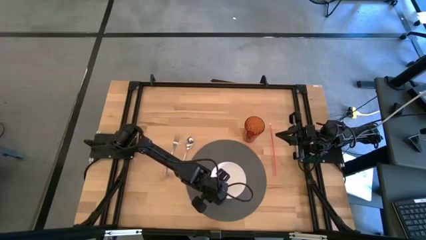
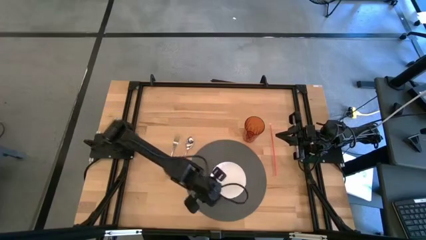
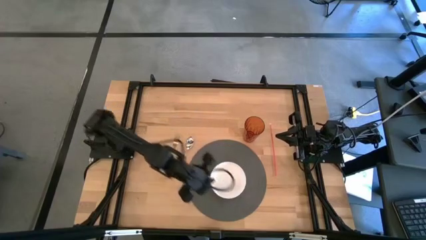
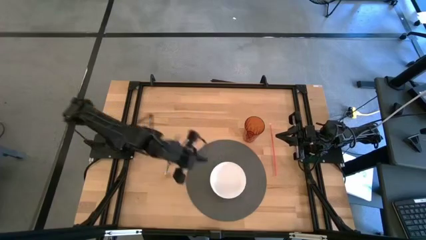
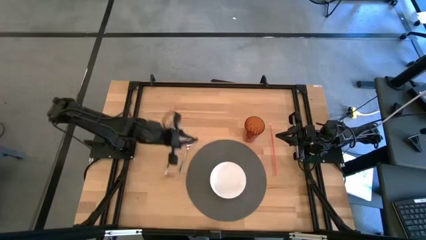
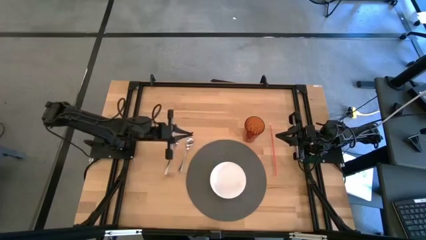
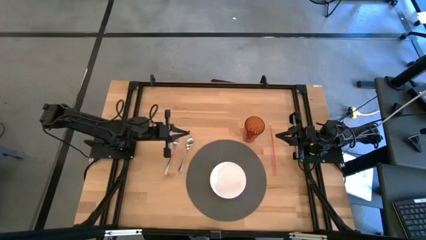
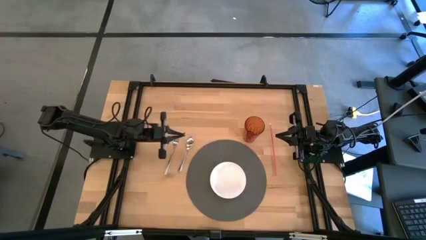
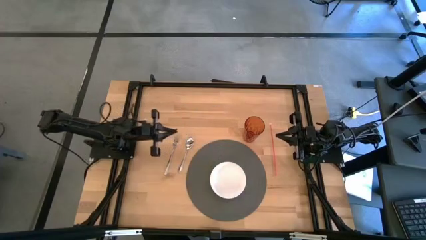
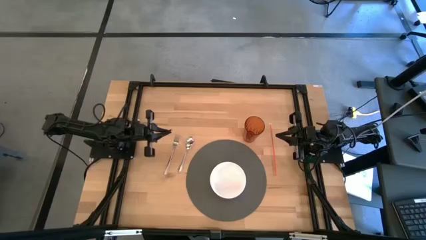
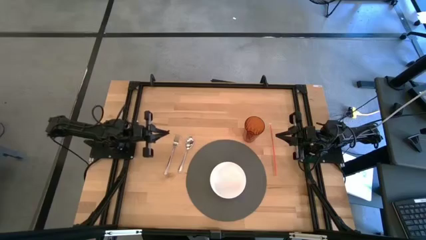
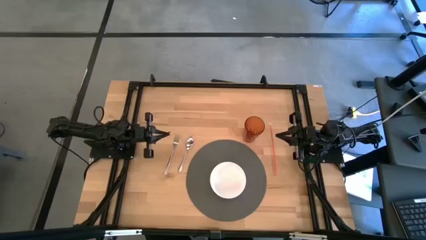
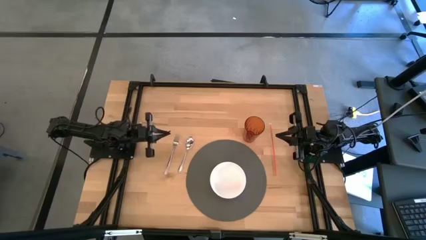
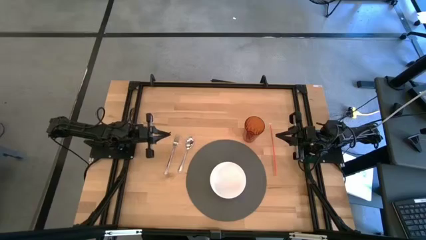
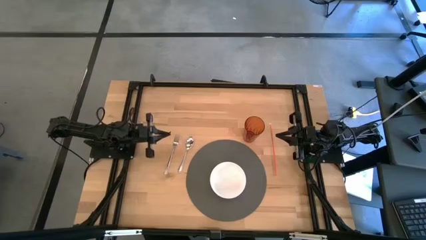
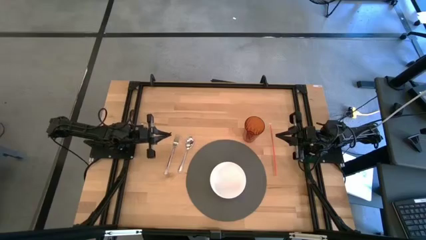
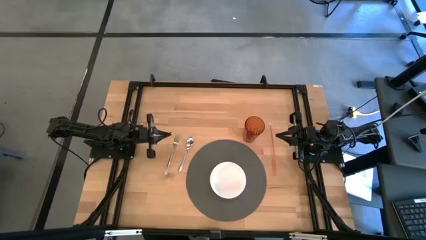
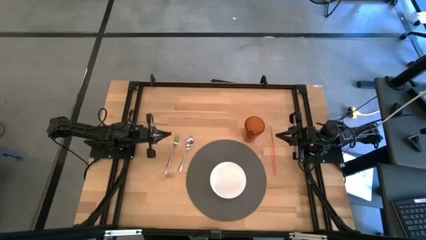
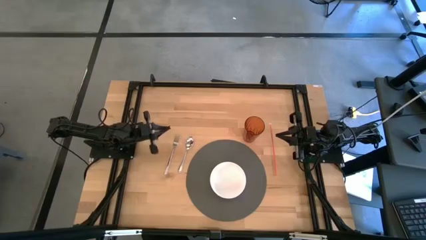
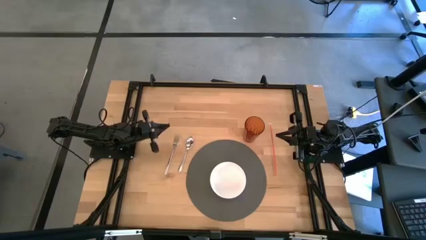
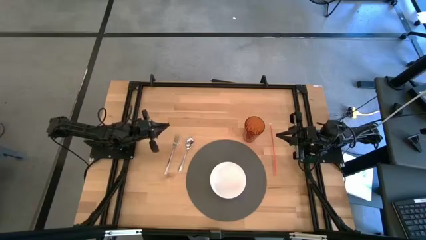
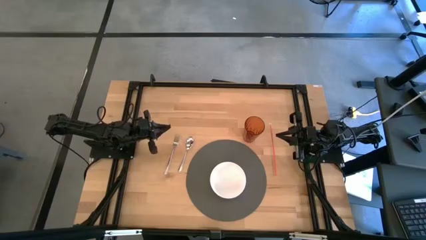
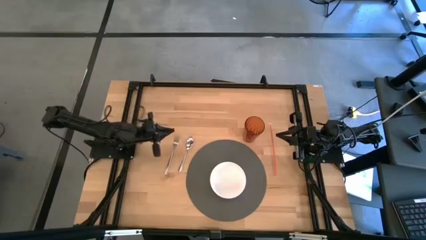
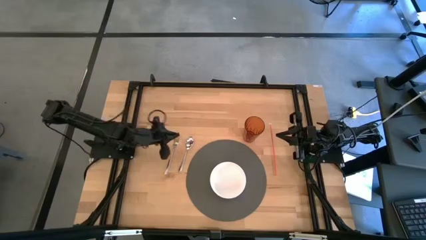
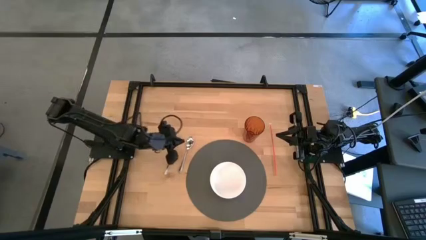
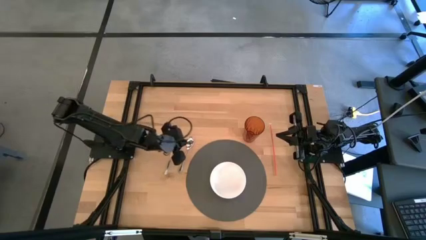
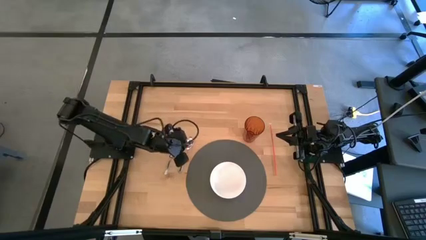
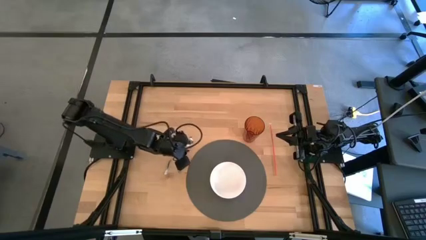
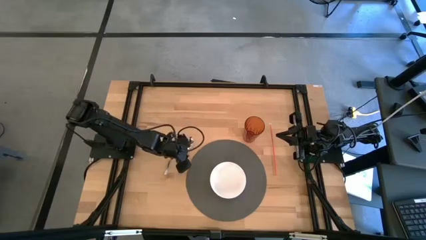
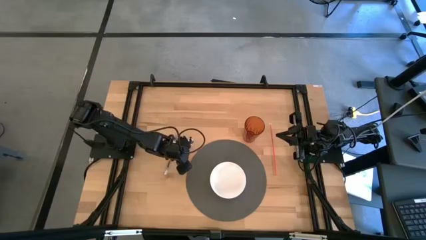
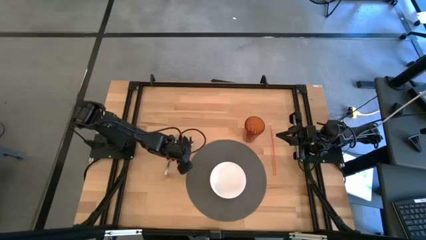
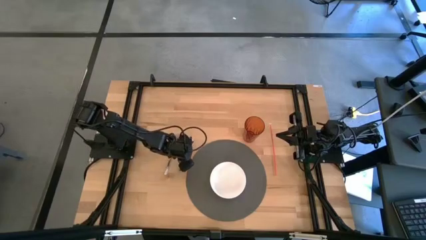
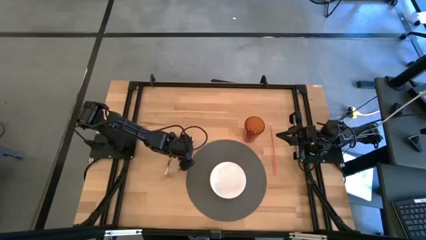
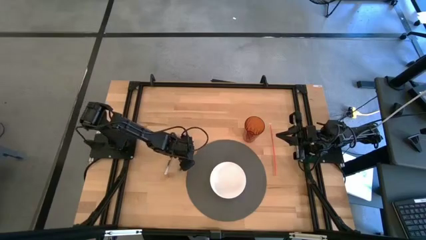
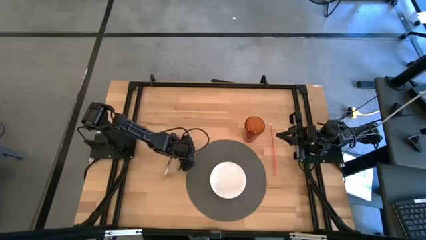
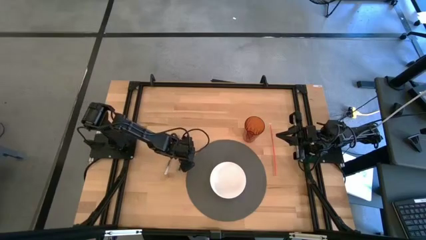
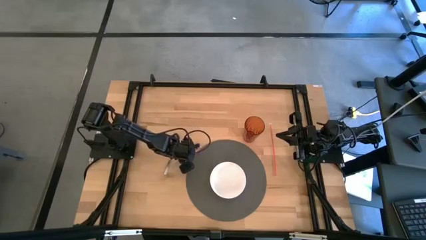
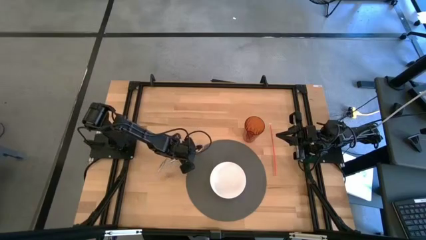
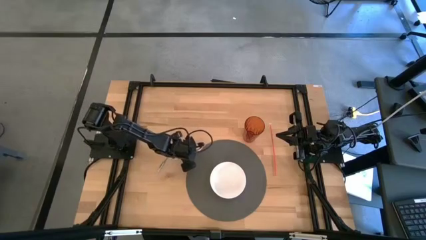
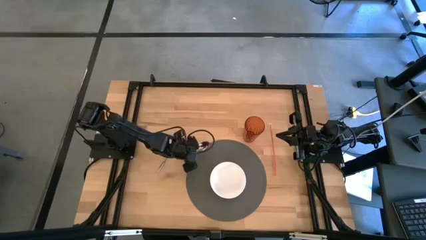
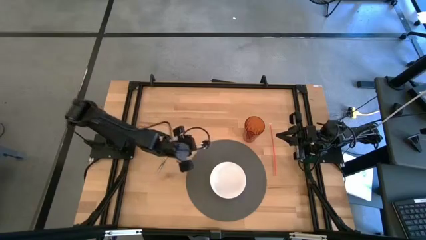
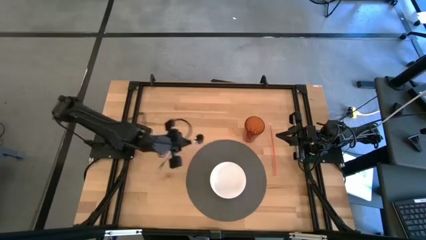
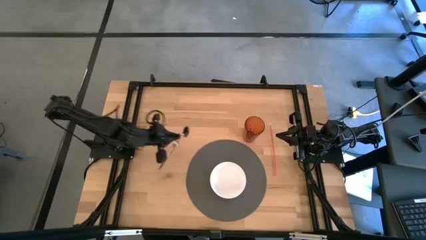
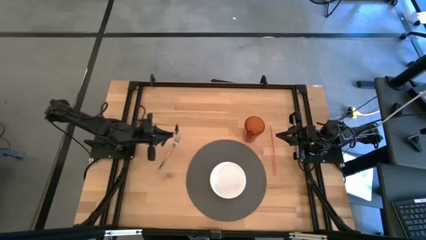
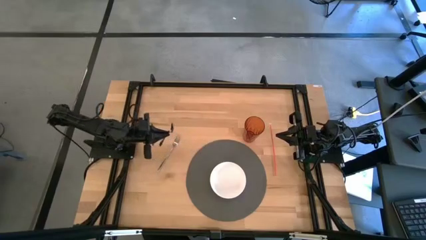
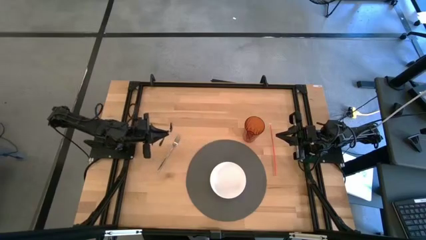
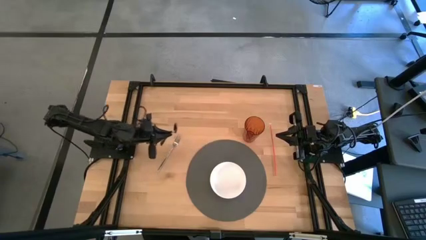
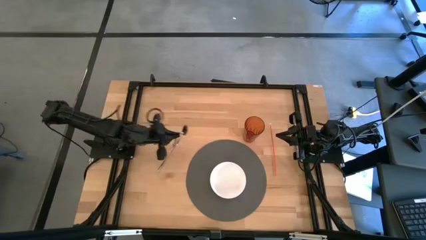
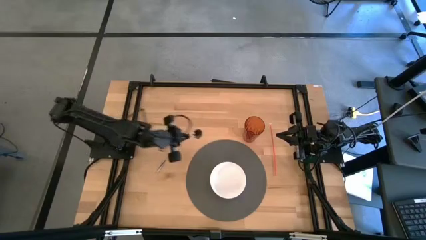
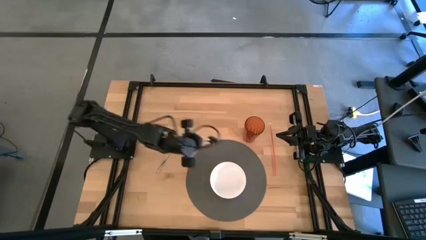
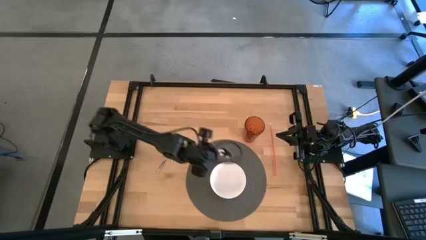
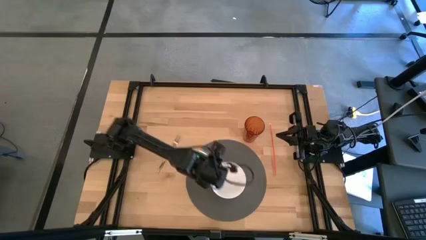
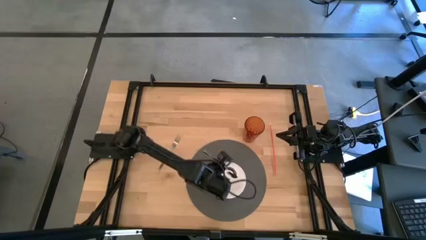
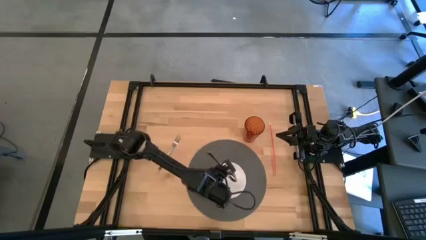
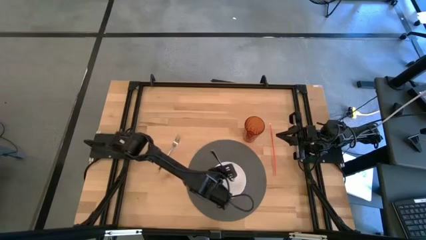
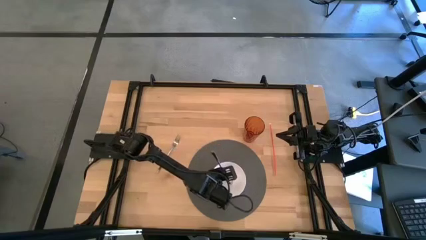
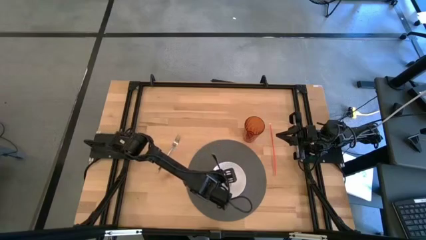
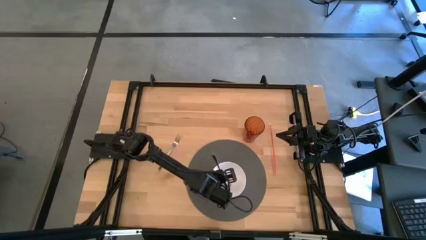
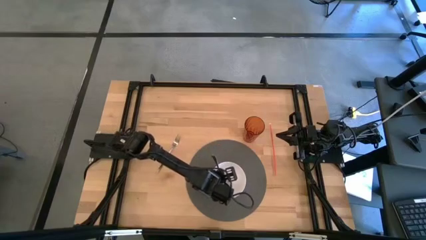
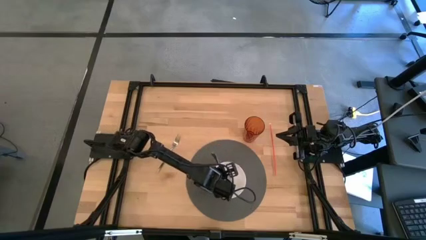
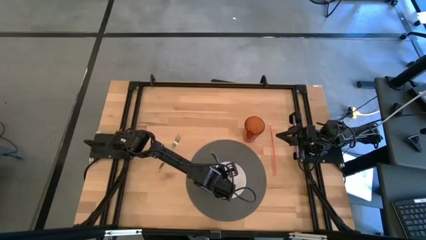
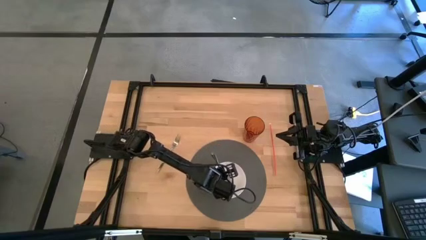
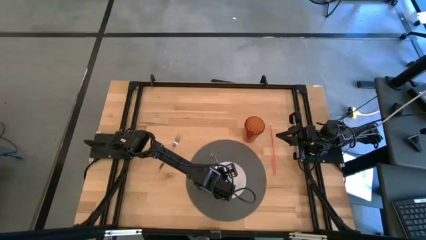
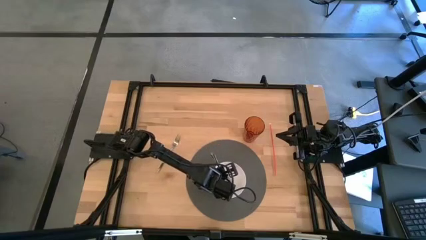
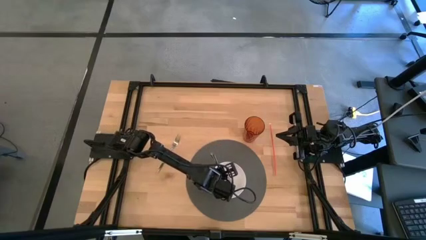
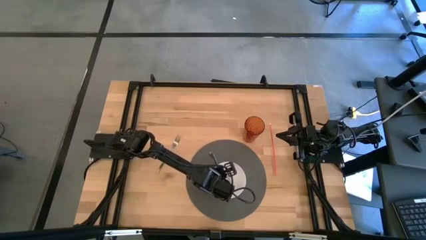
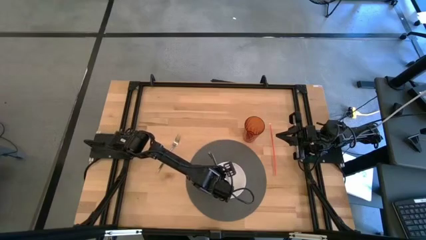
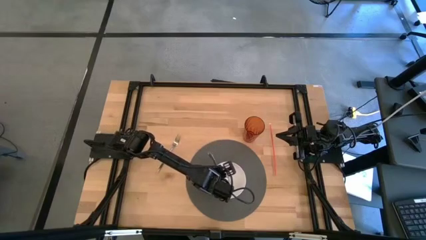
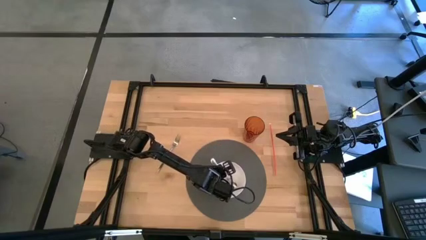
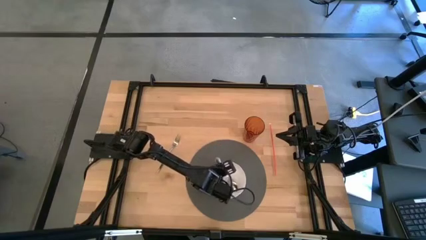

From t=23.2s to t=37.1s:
Task: Pick & Place Utensil
Put the spoon into the white bowl

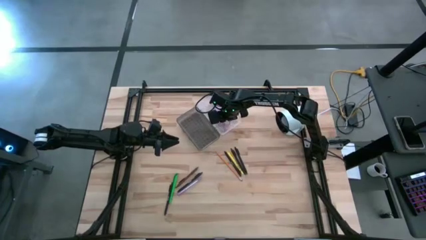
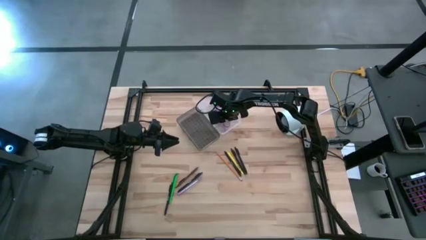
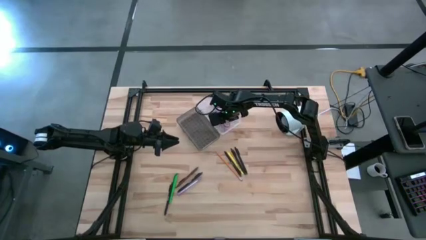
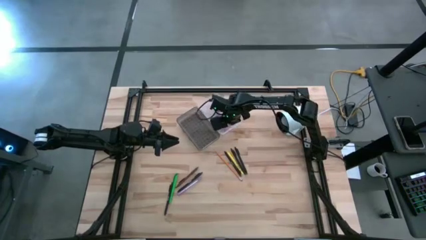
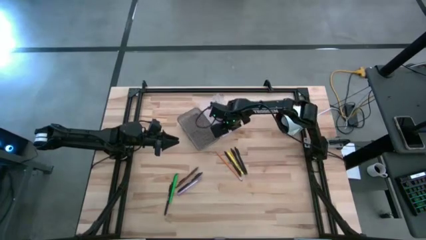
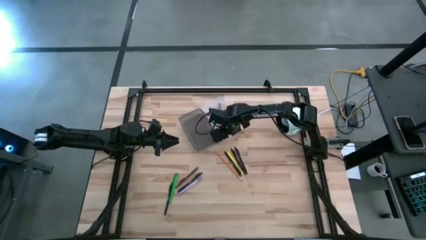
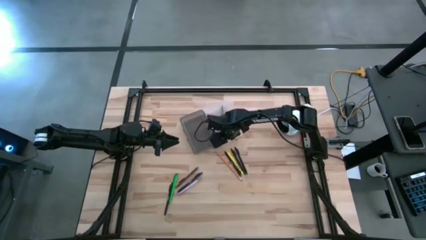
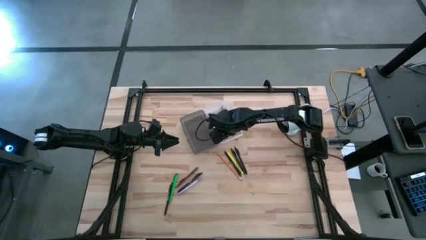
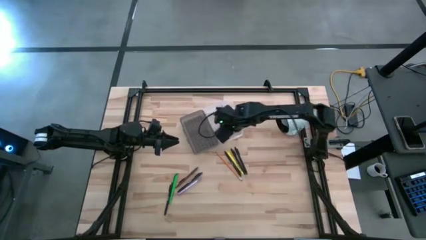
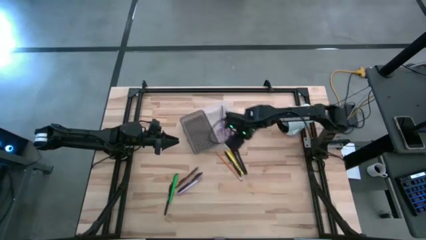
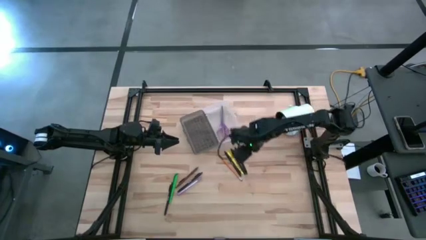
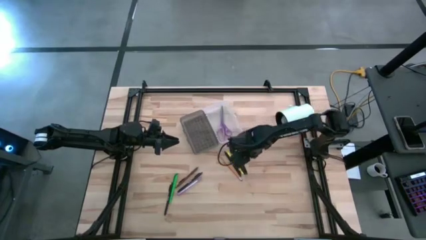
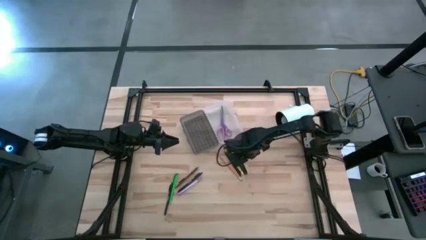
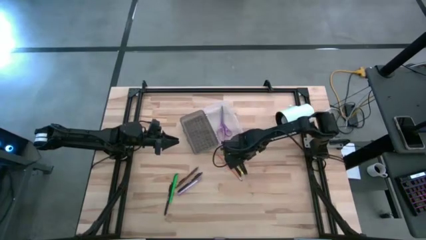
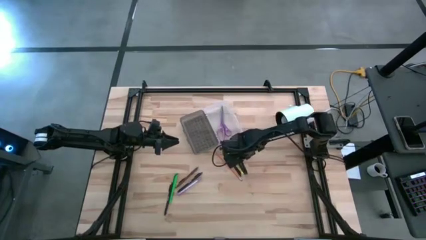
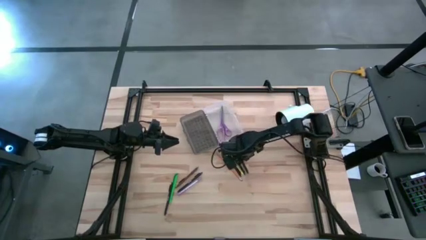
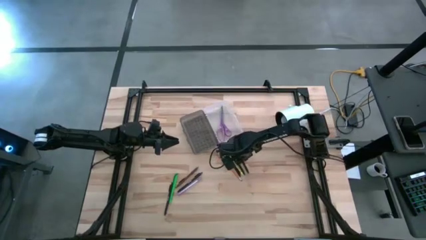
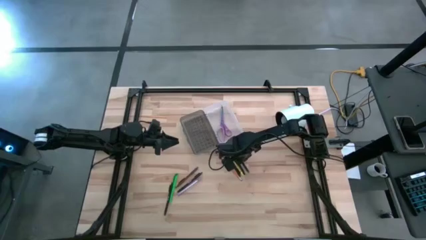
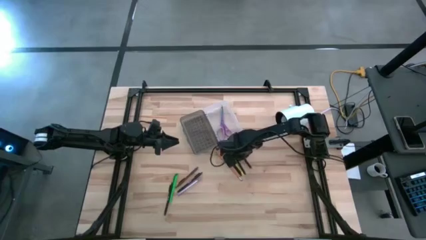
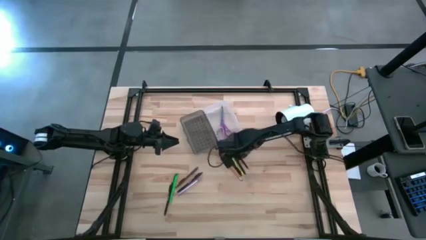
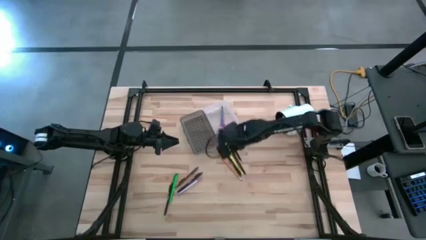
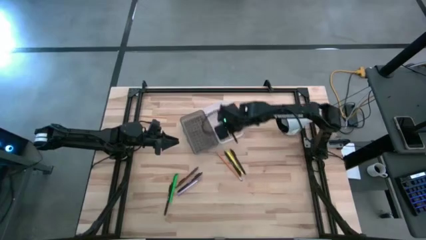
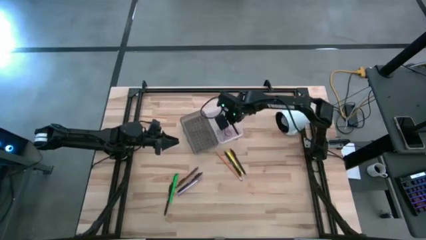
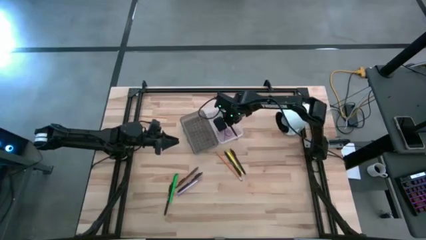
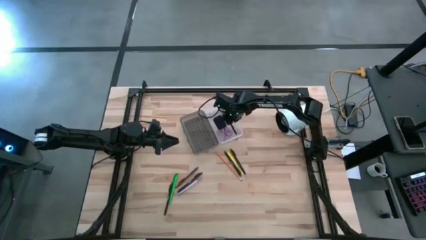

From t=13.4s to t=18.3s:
Task: Pick & place school supplies into a supply box
Put the black pen into the black supply box
